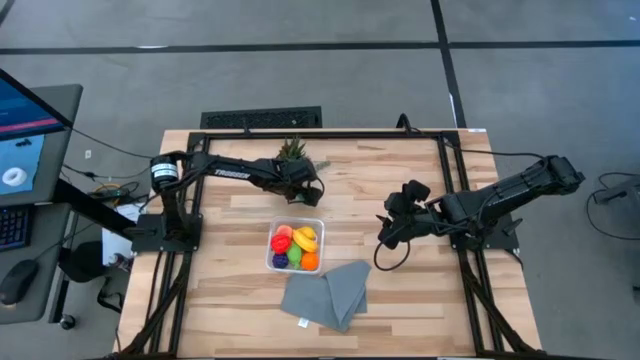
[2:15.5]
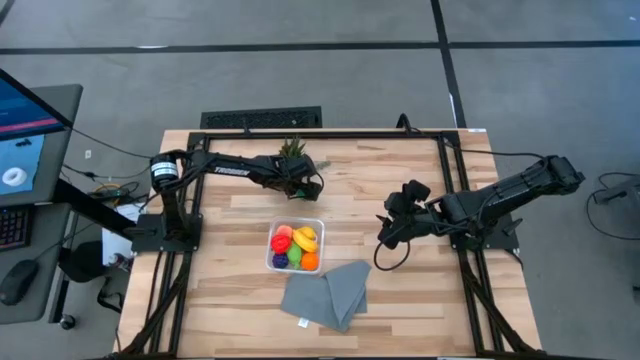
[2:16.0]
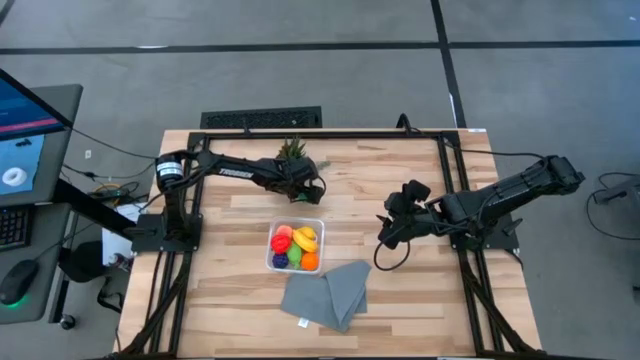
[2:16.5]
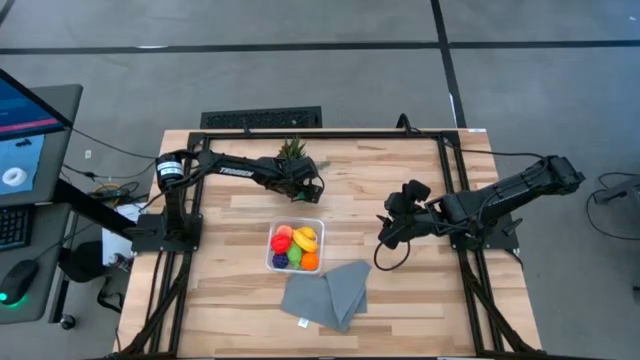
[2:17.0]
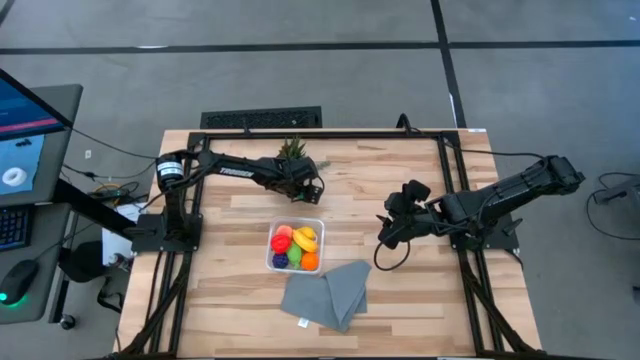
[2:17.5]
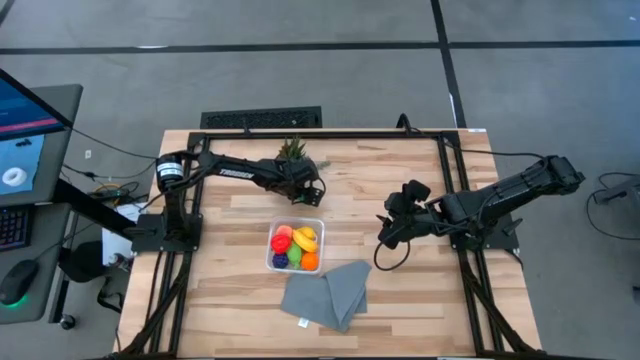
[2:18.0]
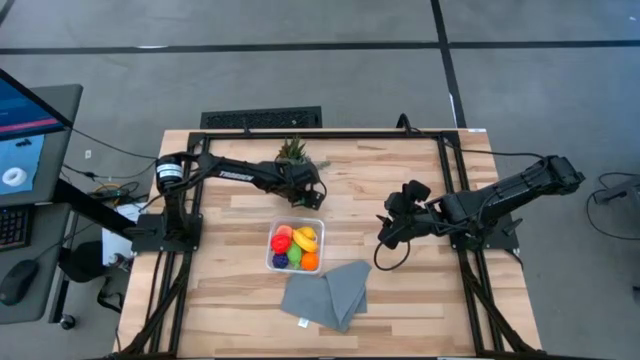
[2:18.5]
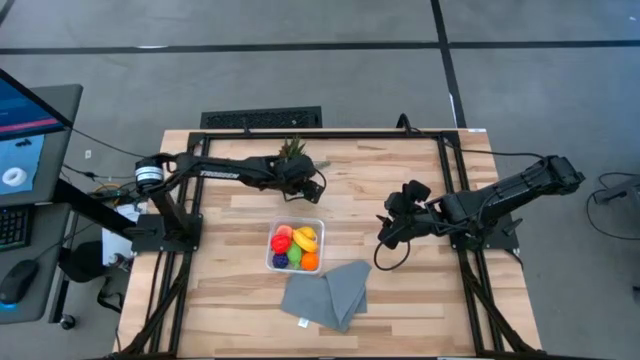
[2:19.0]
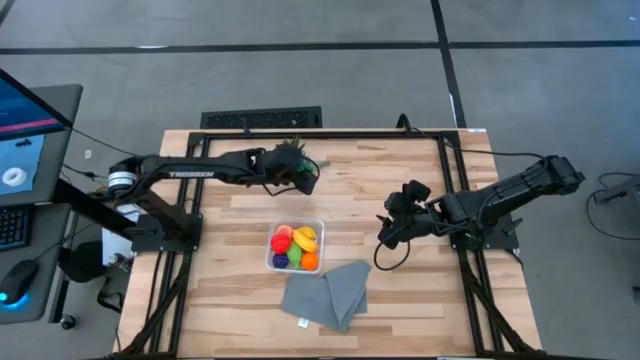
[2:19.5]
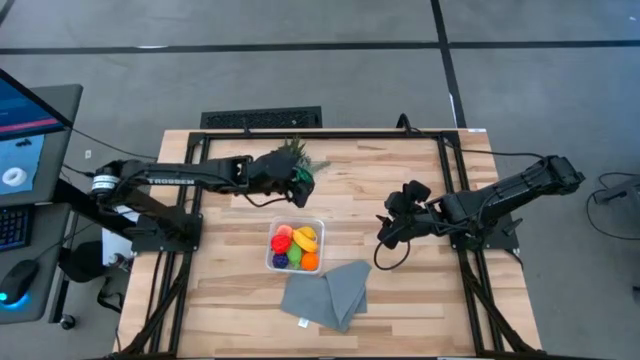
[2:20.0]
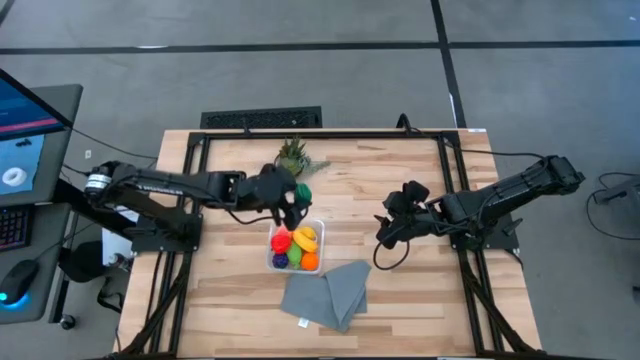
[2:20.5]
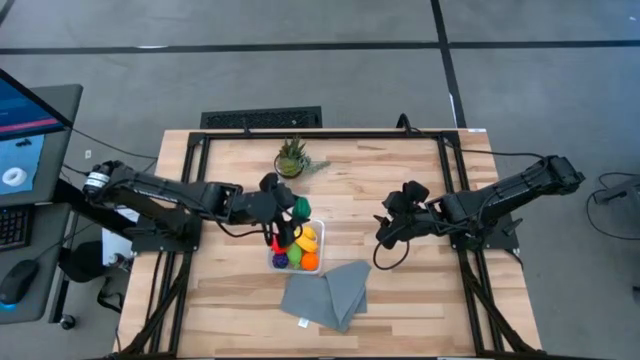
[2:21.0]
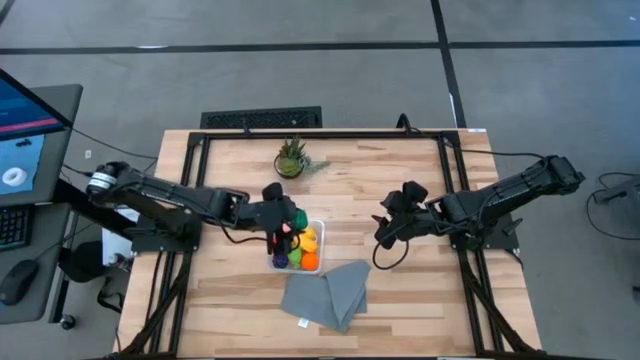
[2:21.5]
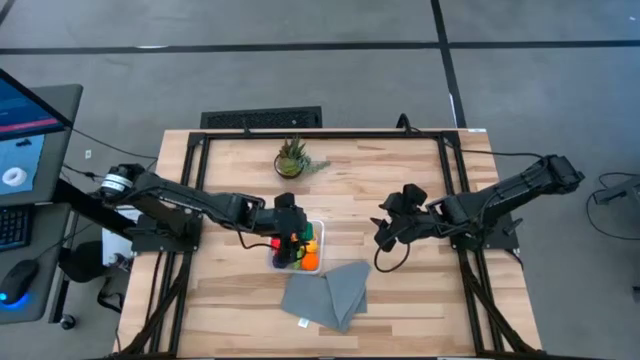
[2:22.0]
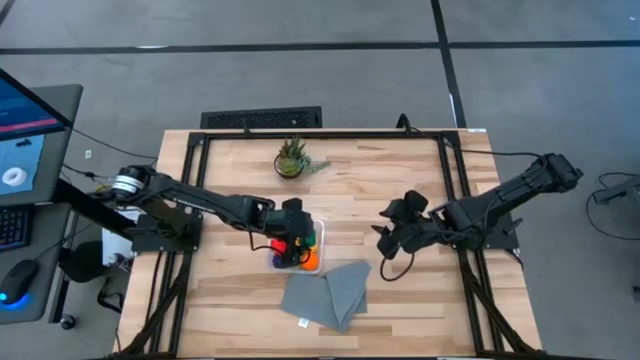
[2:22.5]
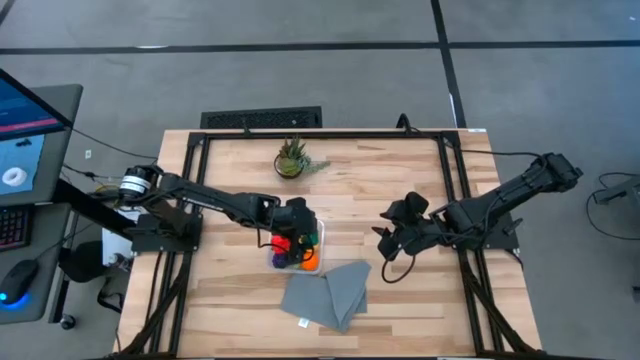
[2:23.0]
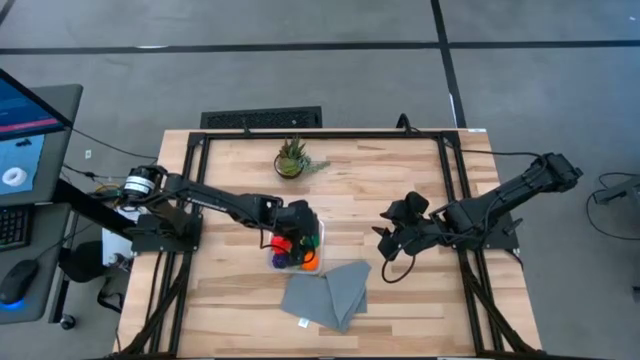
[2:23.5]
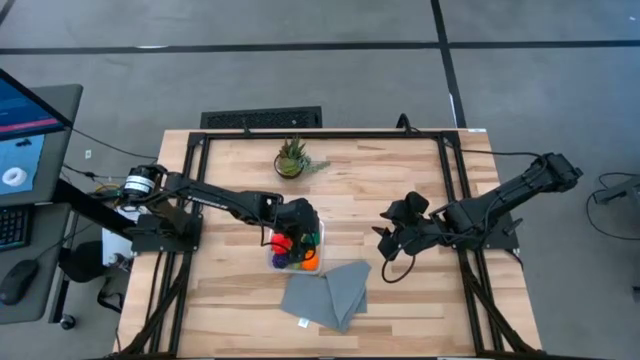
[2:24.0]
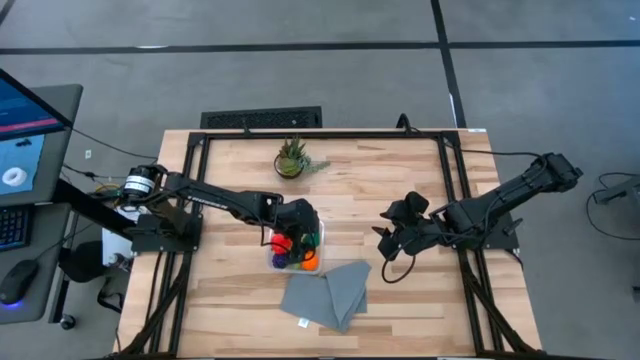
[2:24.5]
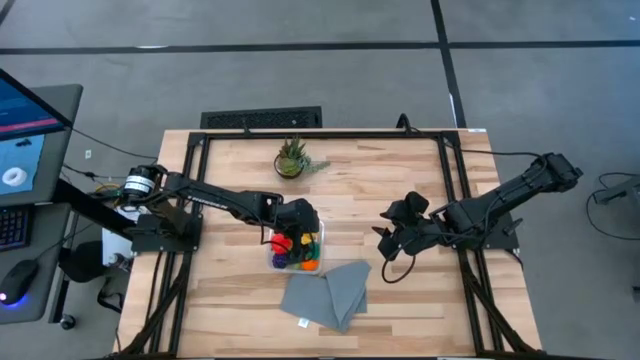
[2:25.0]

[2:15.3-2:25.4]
Task: Pick and placing Produce into tupperware
Put the green bell pepper into the transparent container

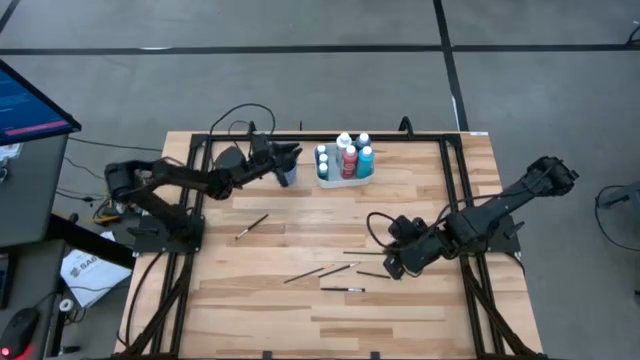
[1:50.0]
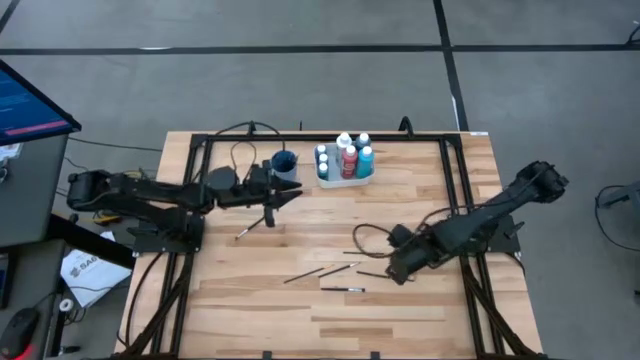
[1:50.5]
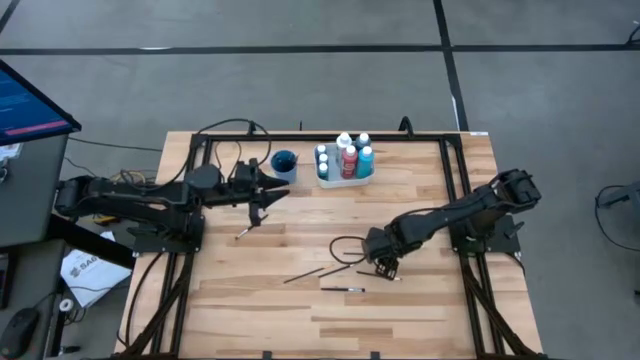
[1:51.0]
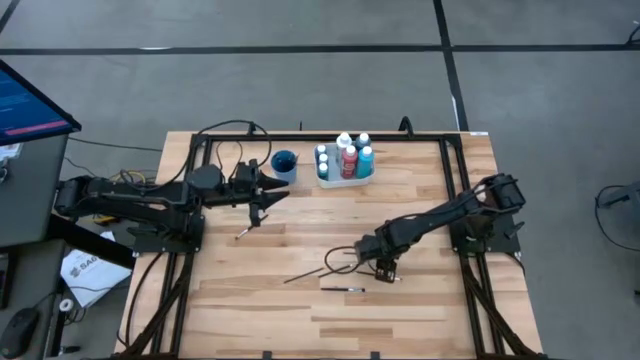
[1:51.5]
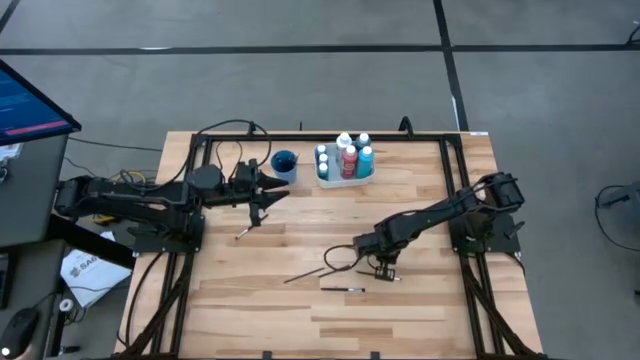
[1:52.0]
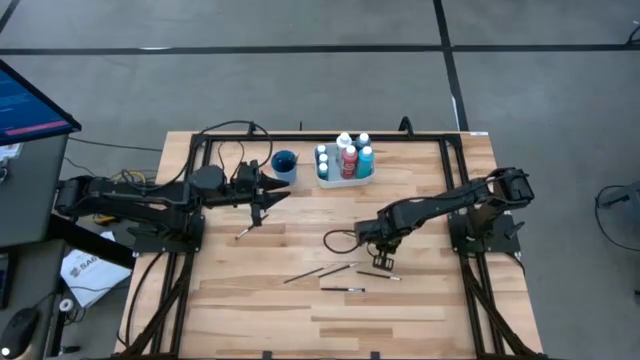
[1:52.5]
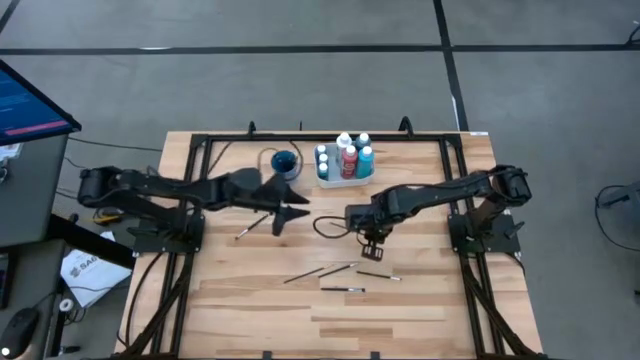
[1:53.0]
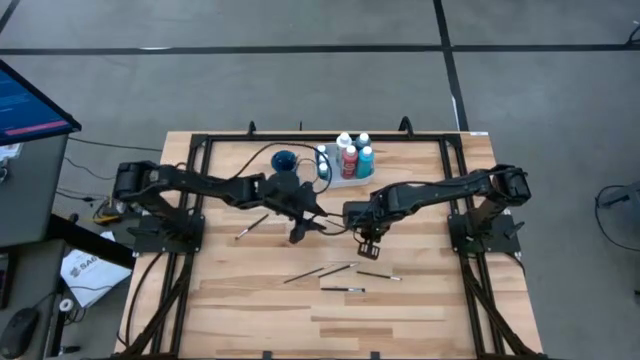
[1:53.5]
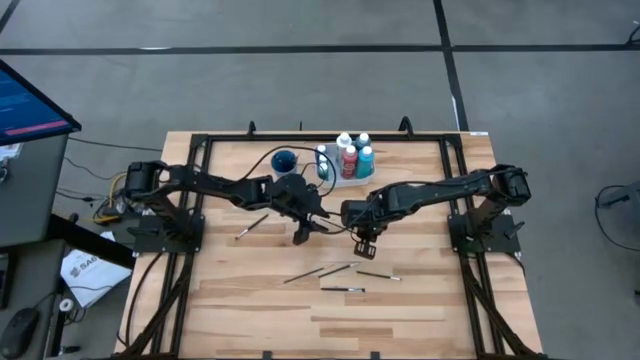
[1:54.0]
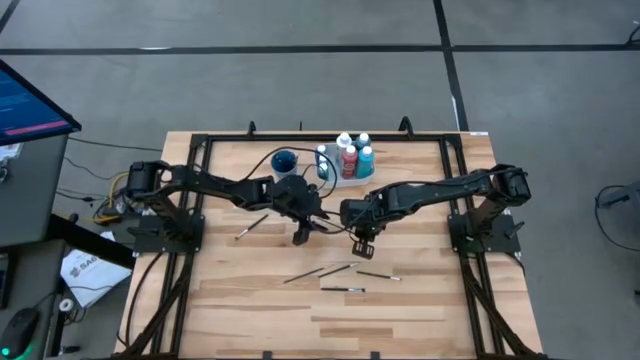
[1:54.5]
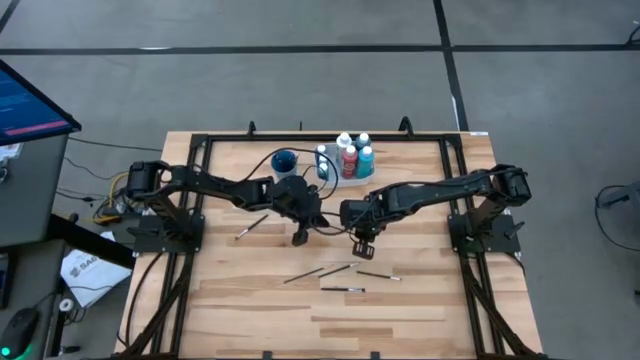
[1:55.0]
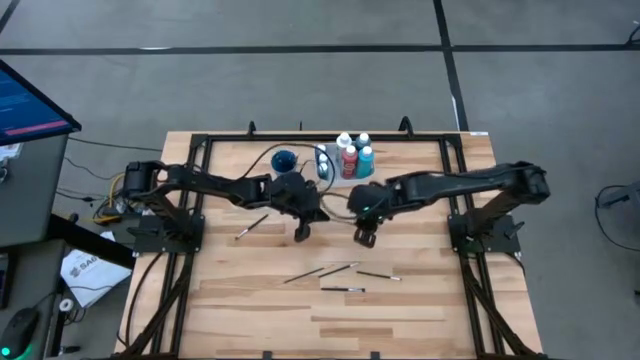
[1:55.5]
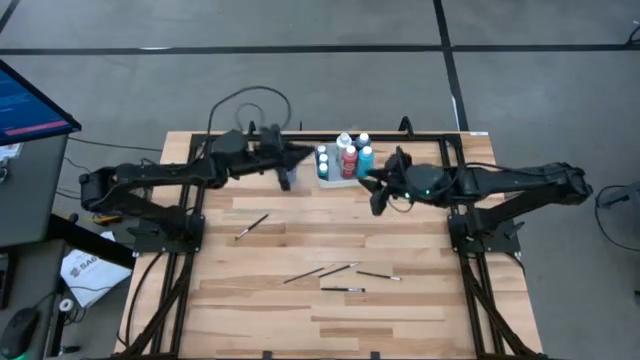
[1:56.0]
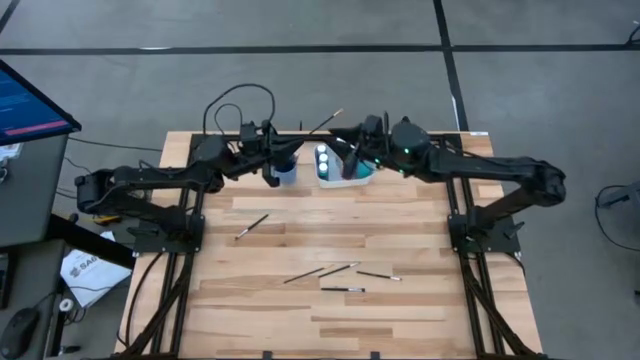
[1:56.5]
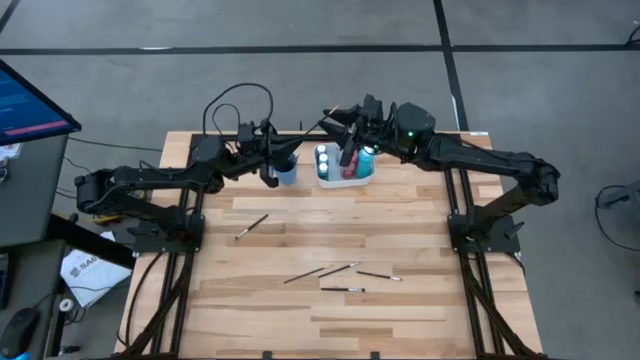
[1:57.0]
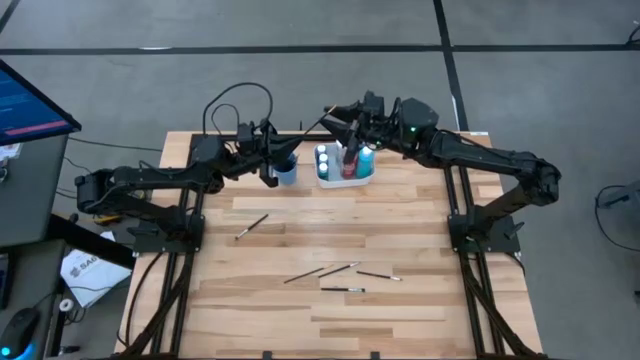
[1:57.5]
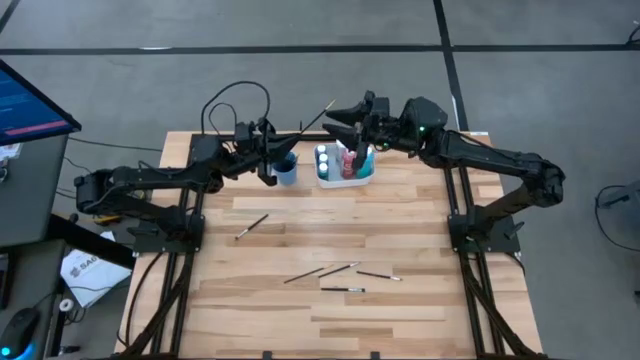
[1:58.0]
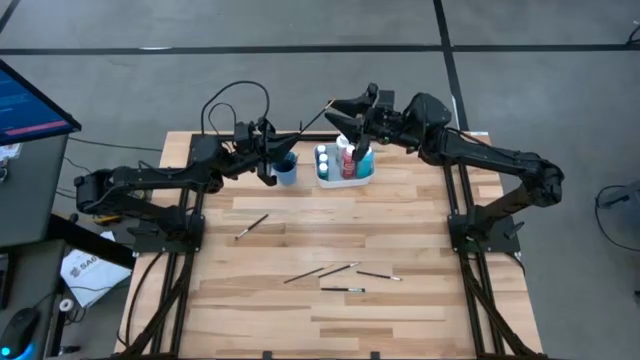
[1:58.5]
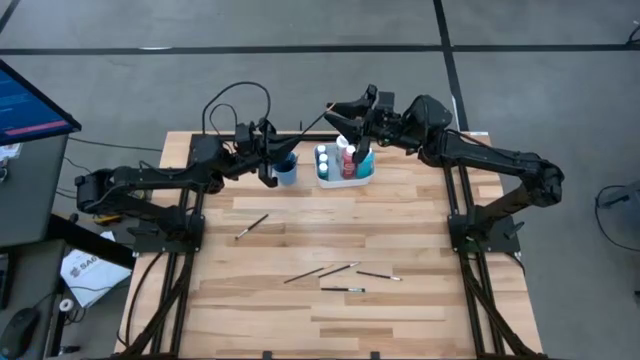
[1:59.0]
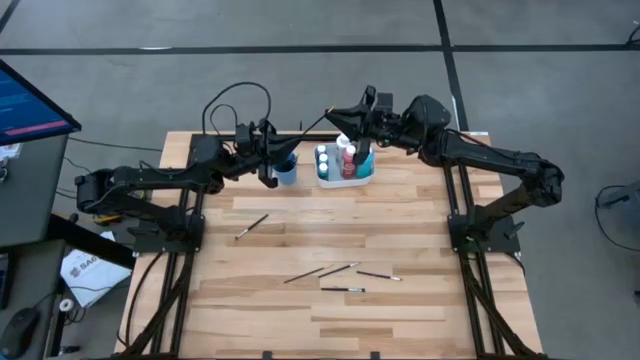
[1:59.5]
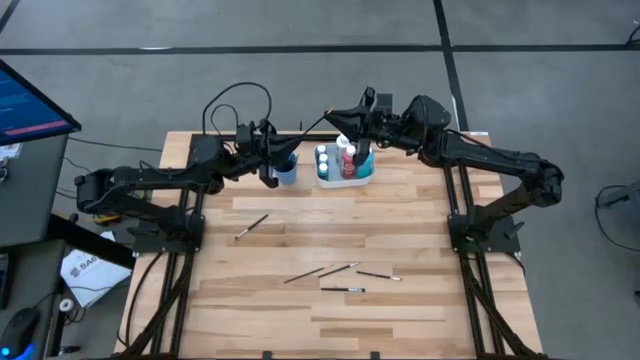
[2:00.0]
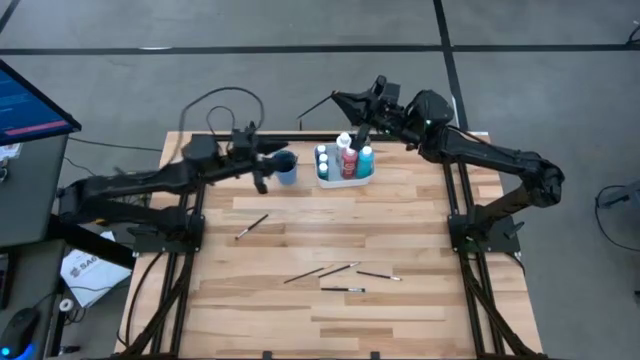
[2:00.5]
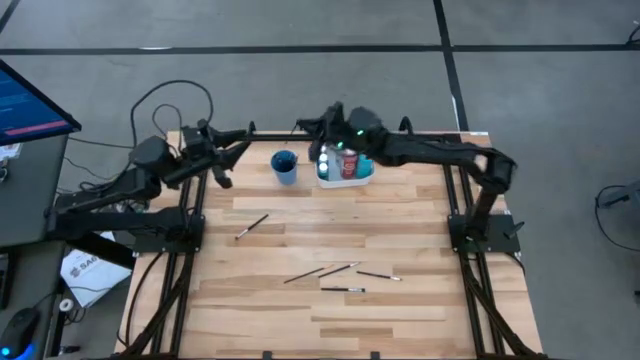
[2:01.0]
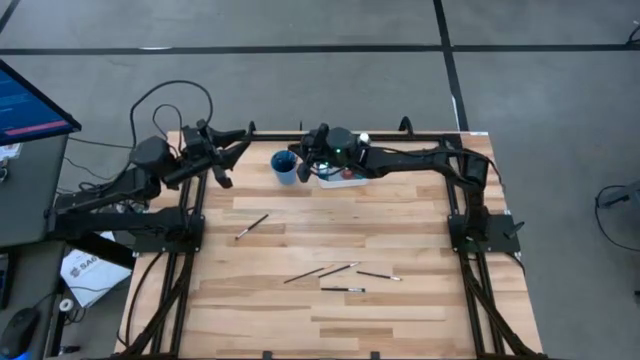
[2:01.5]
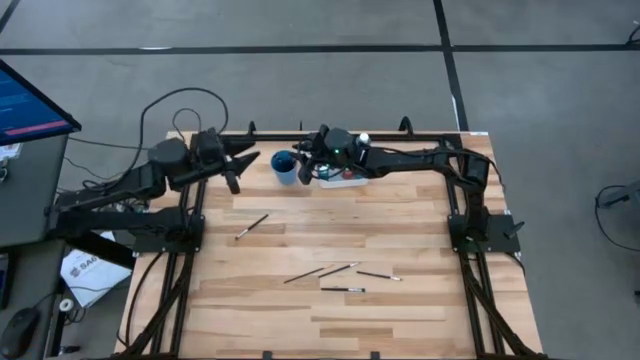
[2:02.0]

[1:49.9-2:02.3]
Task: Pick & Place Paint Supplies
Put the gold and black paint brush into the blue cup
